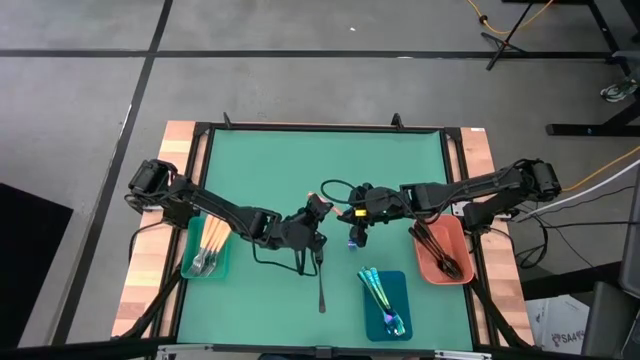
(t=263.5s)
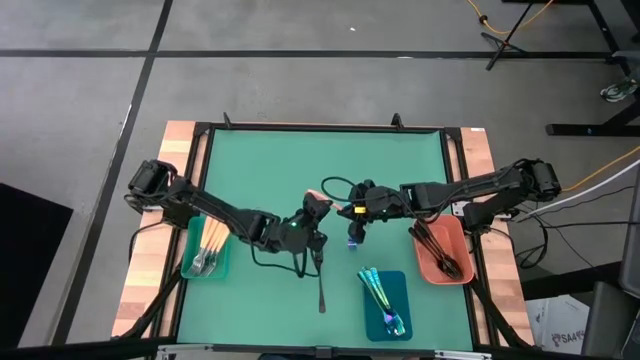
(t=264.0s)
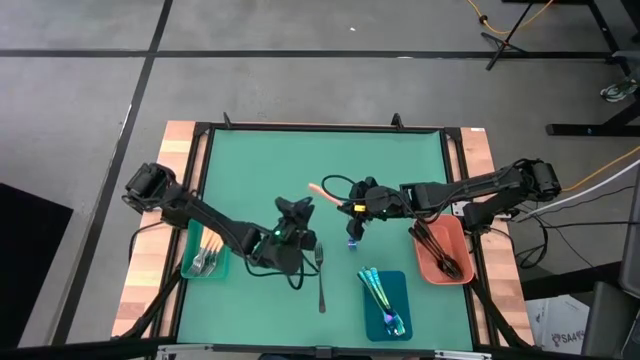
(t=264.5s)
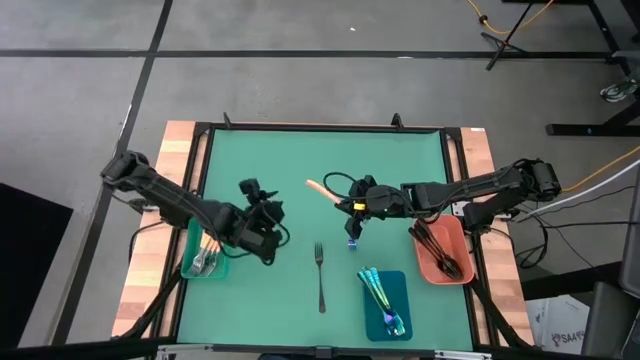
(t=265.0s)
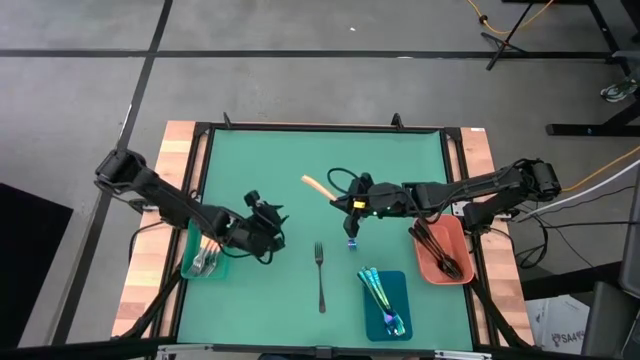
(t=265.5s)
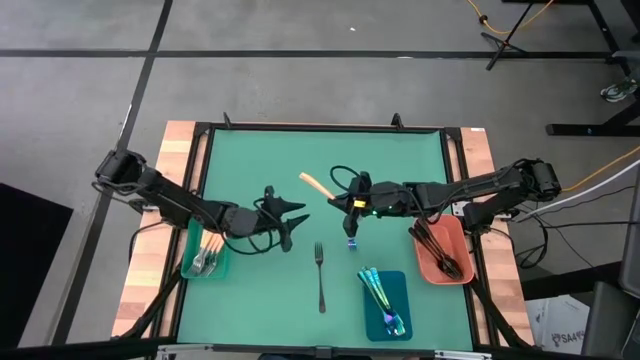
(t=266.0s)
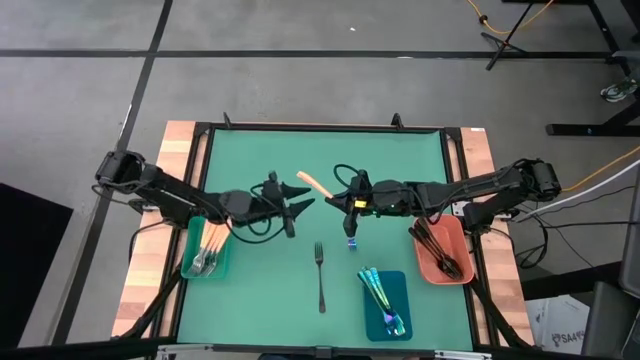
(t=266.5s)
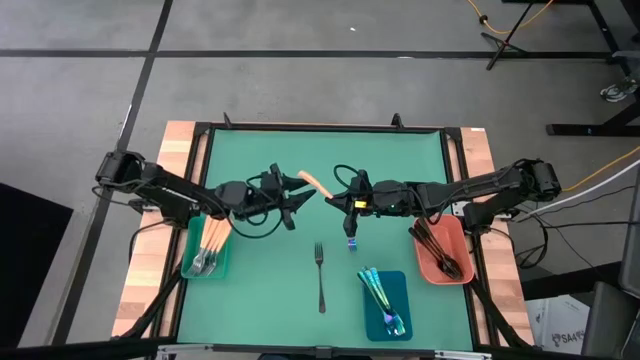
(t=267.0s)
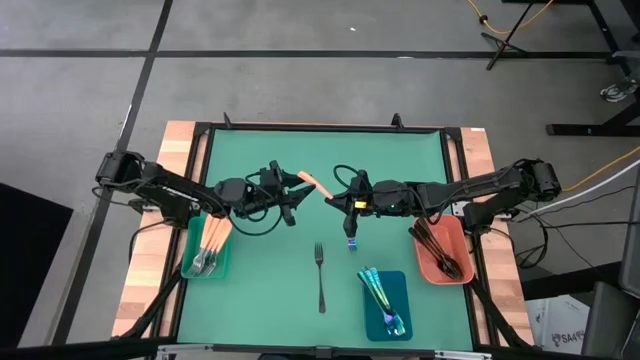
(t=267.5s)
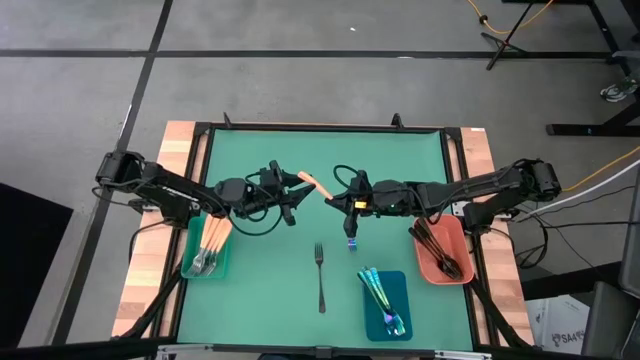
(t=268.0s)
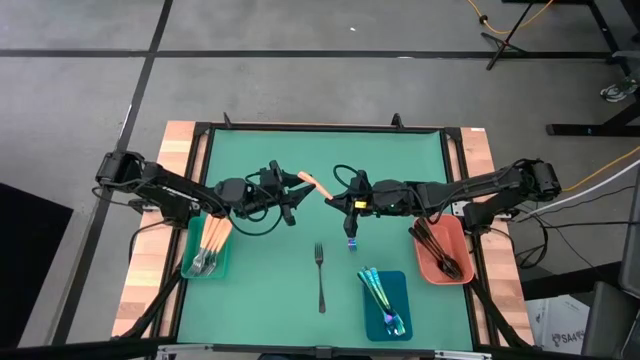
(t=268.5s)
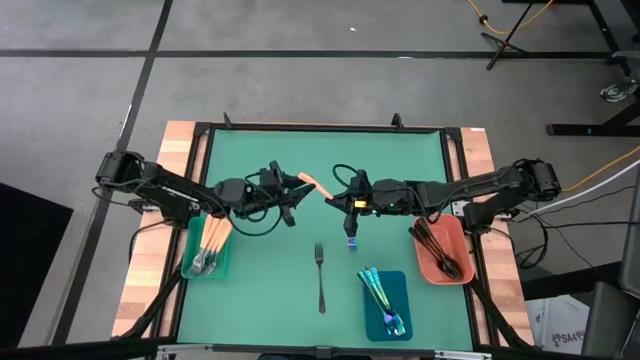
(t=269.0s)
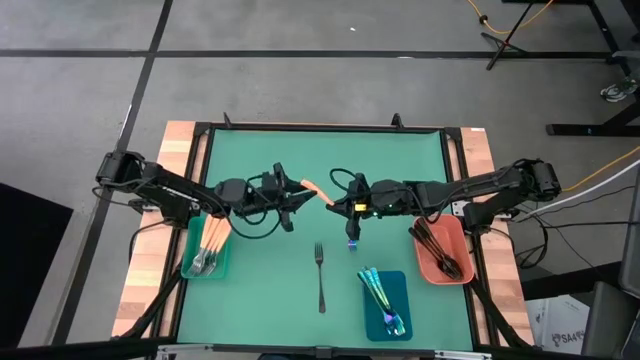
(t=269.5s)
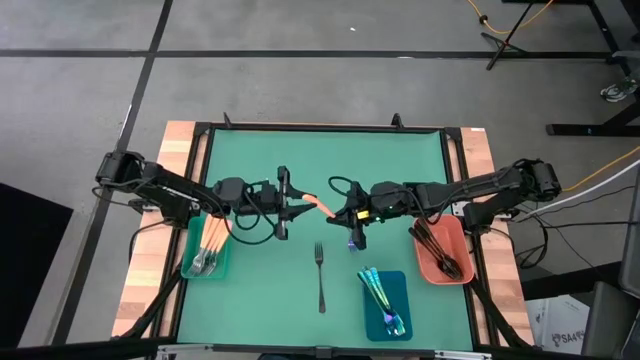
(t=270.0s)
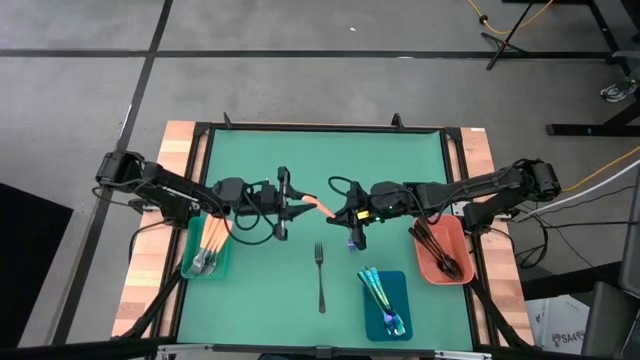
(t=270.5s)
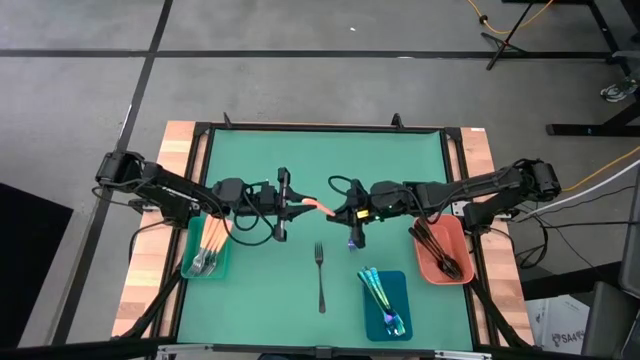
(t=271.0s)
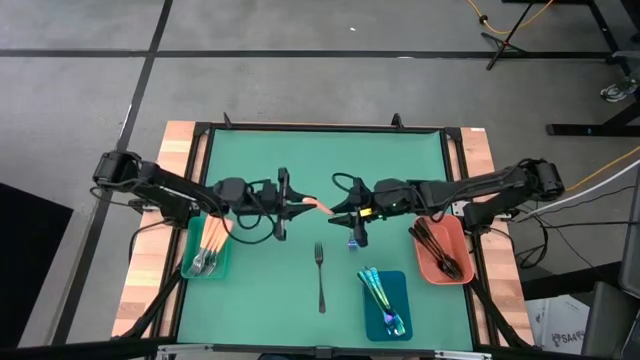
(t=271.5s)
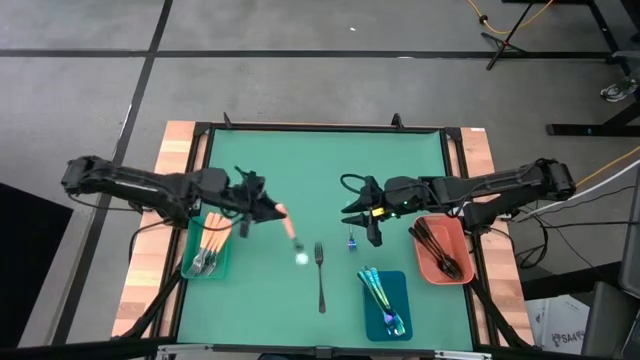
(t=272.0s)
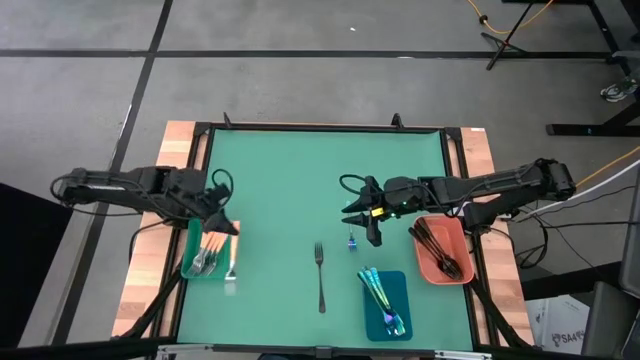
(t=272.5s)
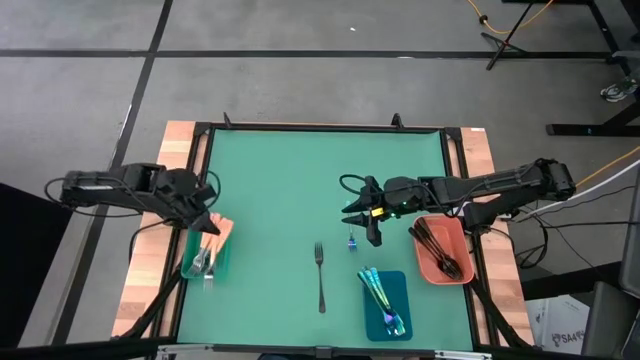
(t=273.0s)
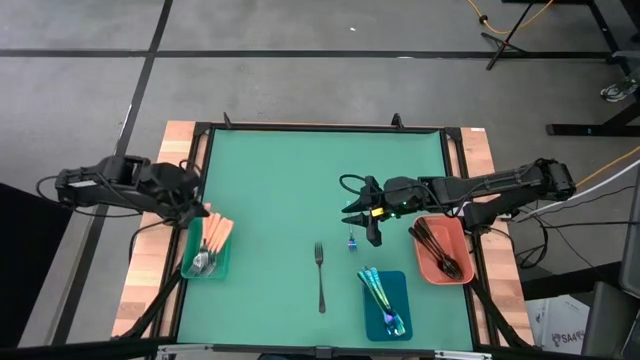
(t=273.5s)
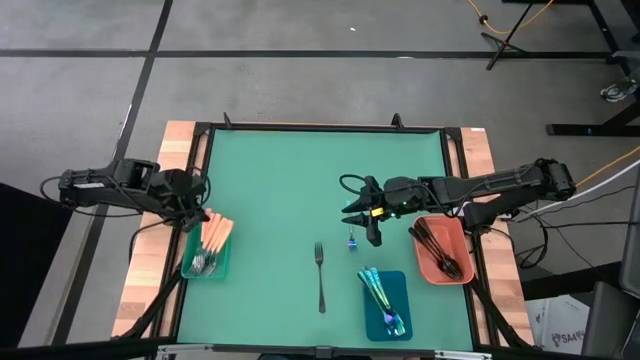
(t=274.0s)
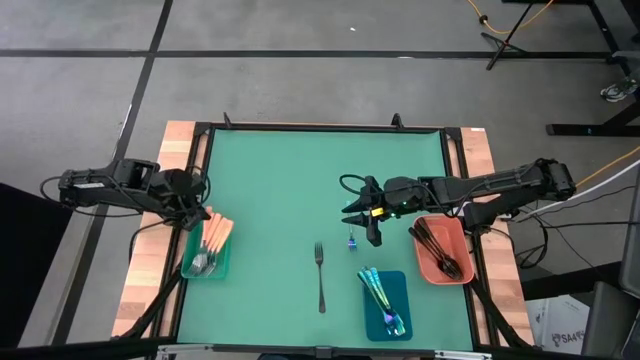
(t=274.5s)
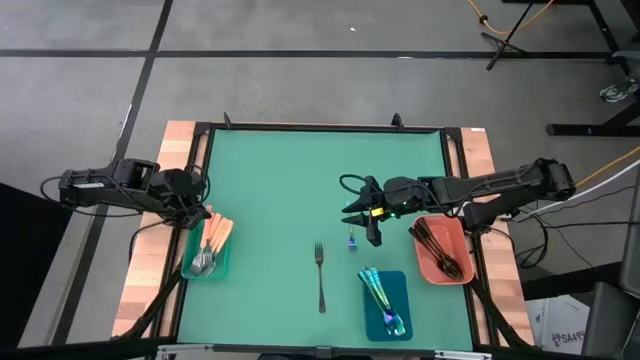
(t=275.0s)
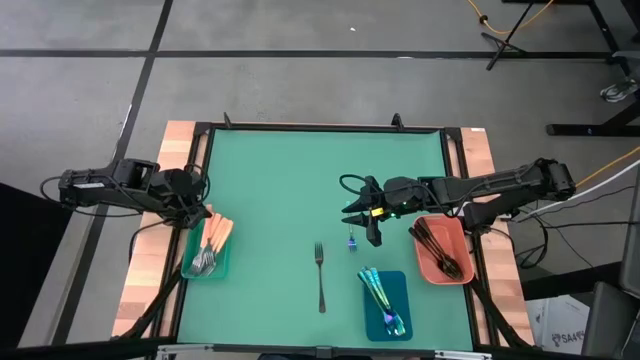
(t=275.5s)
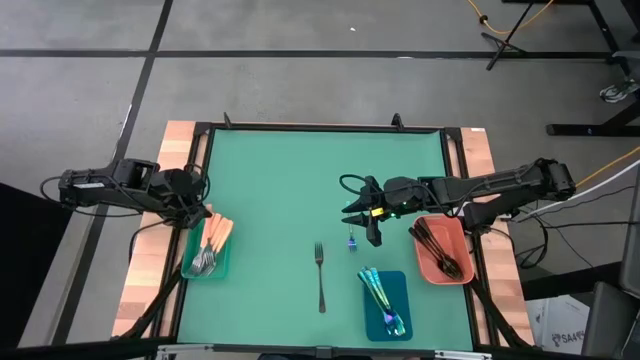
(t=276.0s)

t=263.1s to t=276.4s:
Task: Sort silverware by color (type)
Put the yellow fork into the green bin

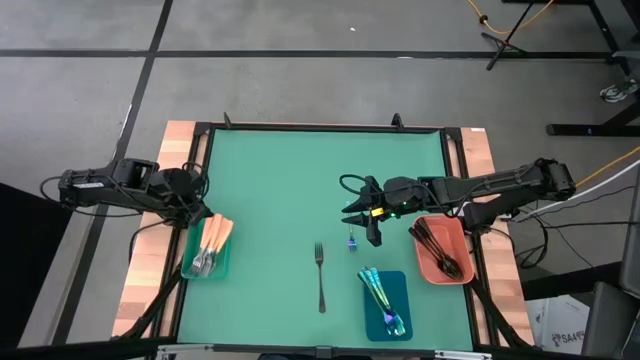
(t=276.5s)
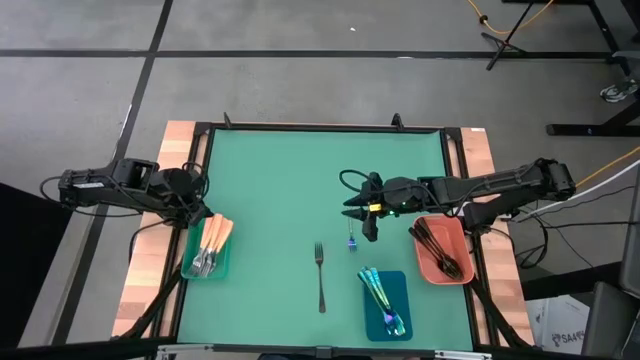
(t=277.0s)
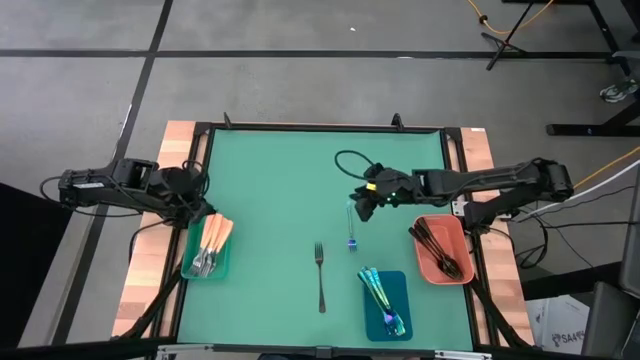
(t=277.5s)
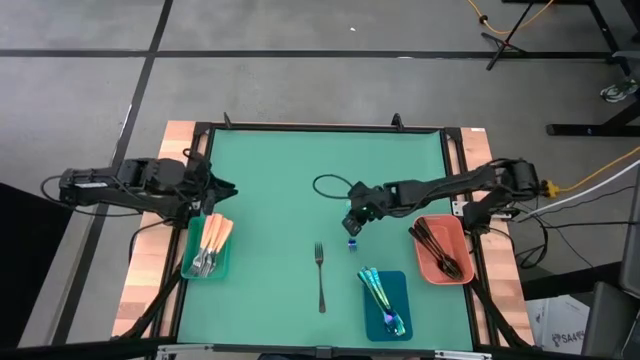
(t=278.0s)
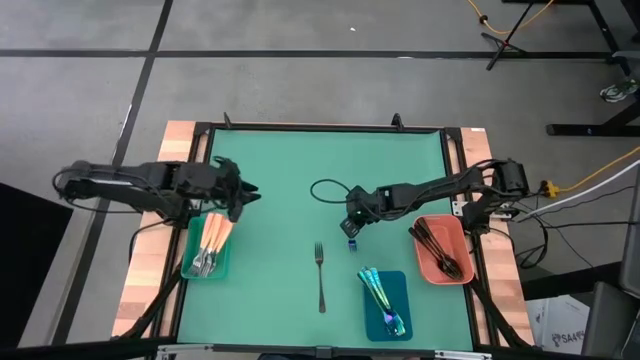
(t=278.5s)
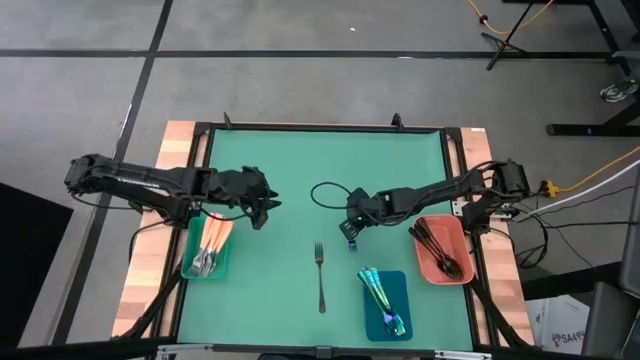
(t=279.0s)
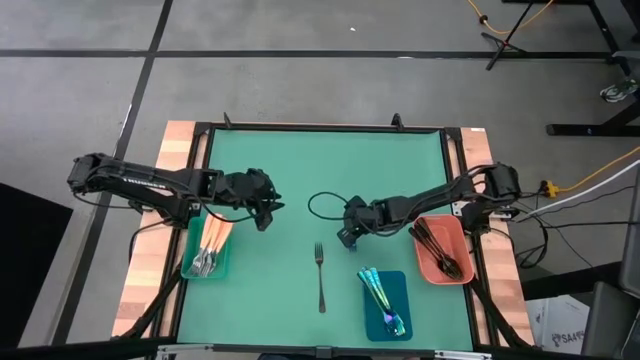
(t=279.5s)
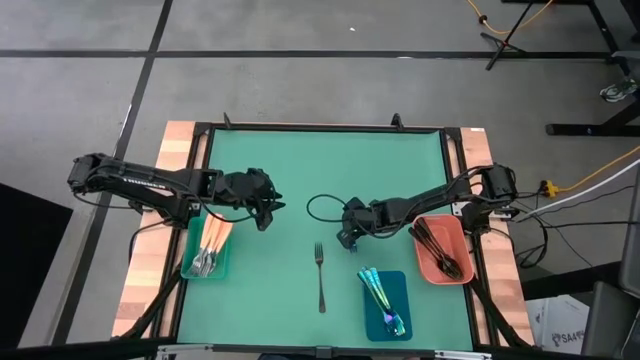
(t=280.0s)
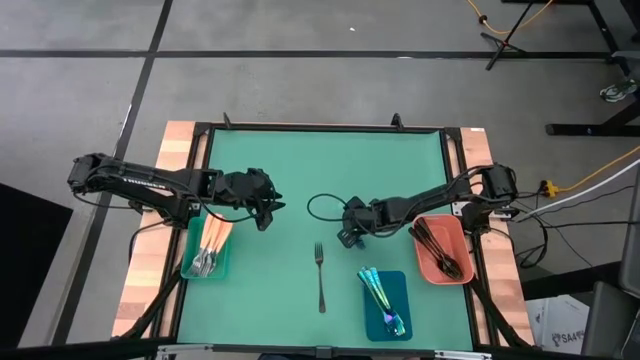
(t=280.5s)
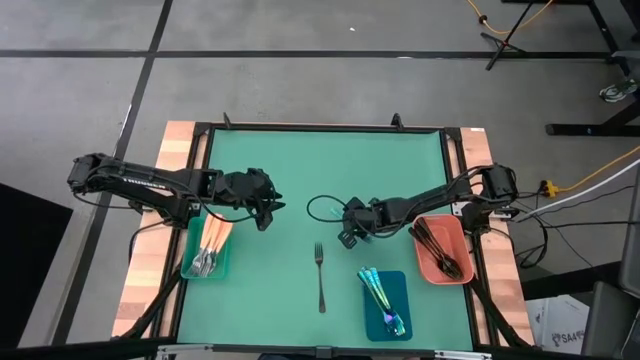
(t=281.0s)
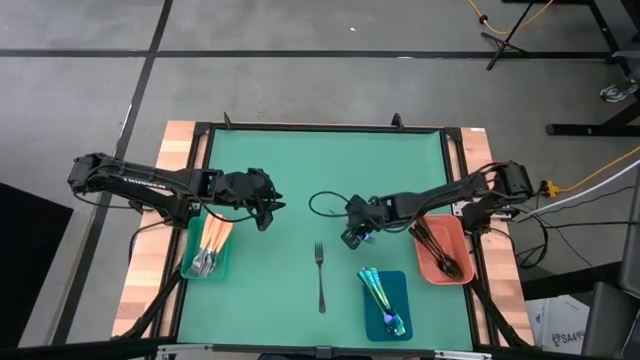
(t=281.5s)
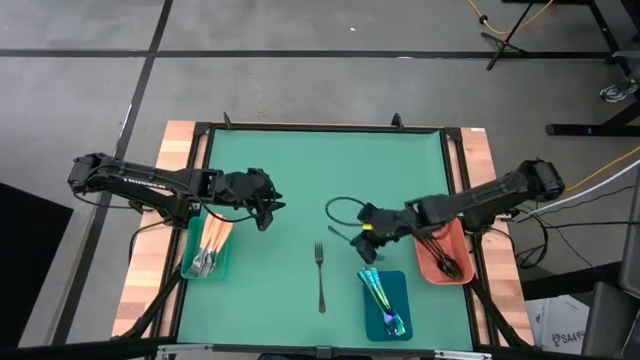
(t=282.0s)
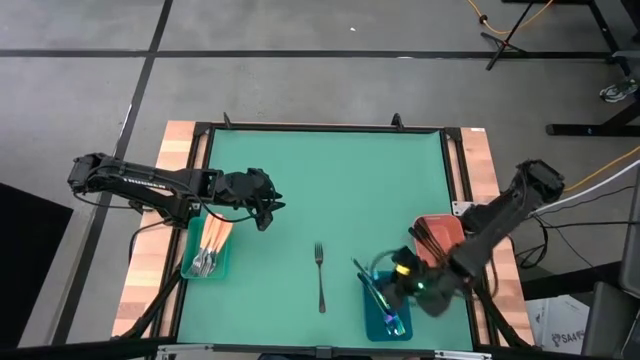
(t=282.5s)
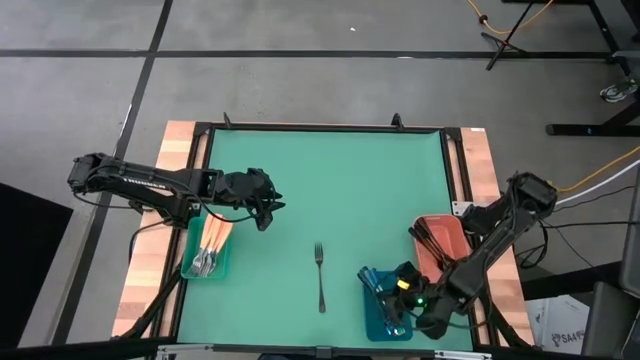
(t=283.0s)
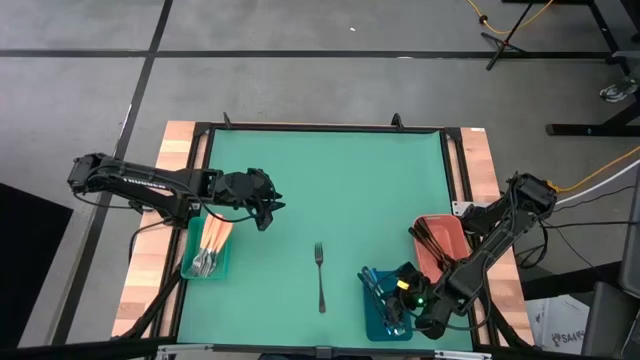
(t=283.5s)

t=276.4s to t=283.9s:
Put the blue fork into the blue bin
